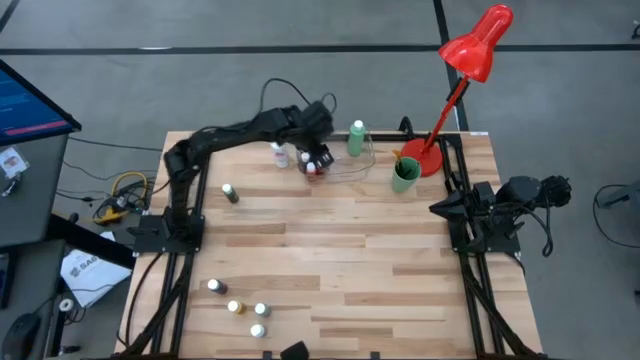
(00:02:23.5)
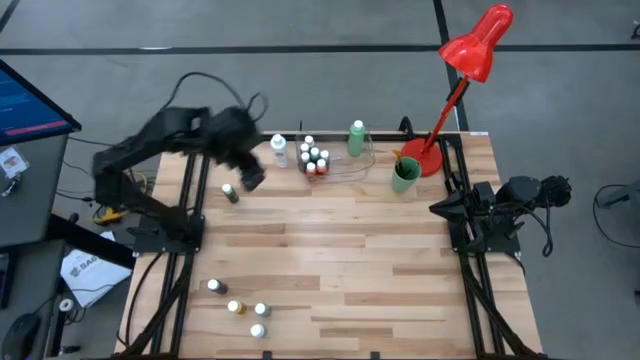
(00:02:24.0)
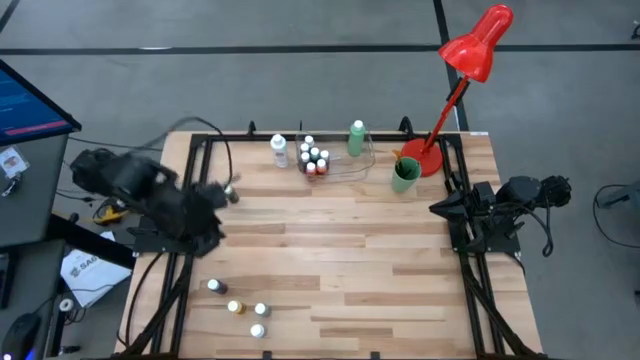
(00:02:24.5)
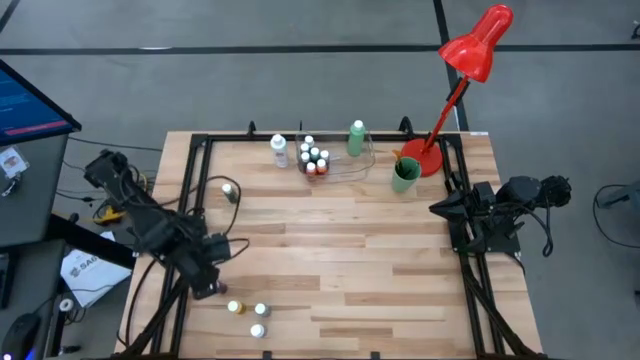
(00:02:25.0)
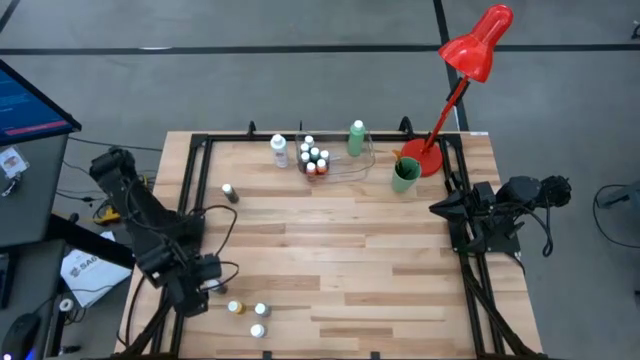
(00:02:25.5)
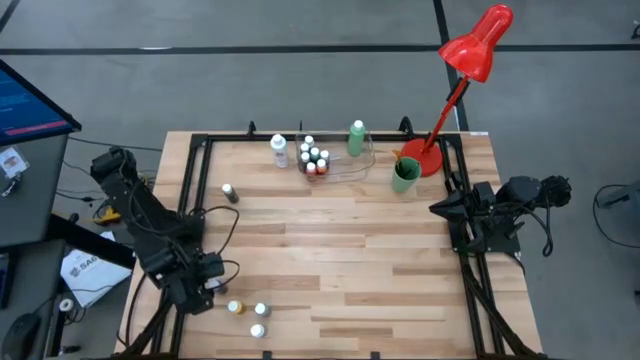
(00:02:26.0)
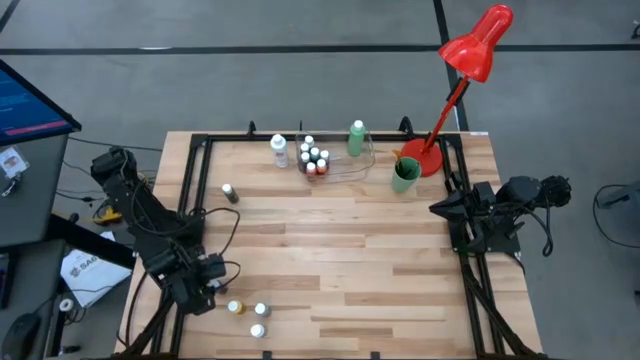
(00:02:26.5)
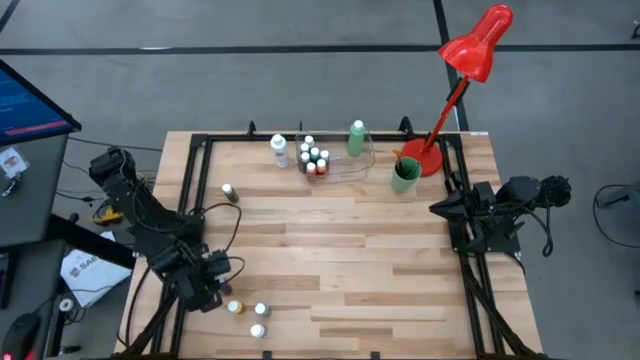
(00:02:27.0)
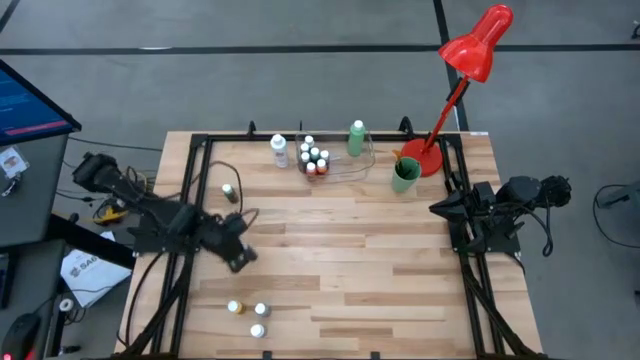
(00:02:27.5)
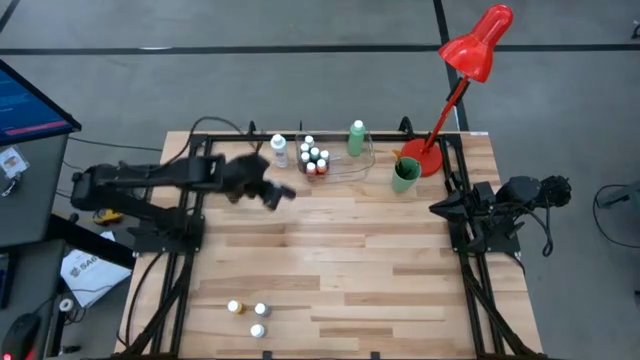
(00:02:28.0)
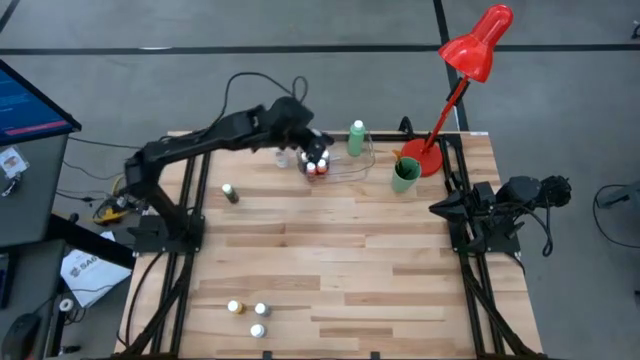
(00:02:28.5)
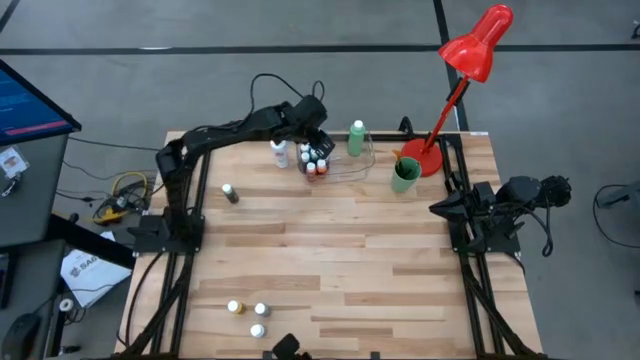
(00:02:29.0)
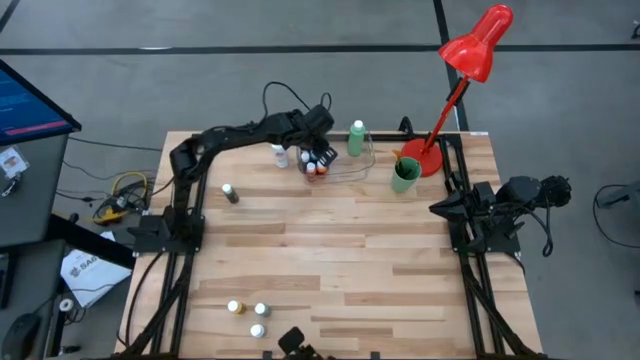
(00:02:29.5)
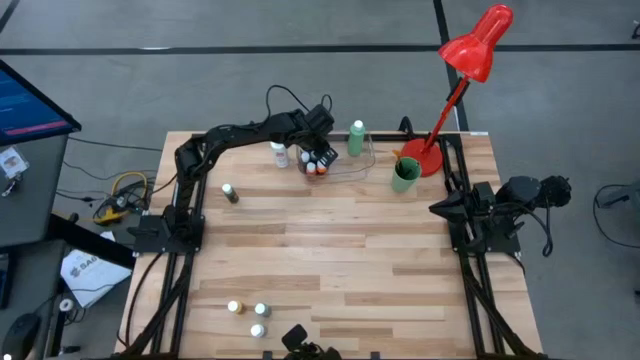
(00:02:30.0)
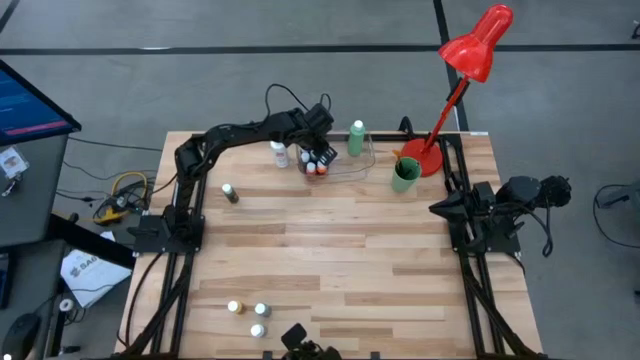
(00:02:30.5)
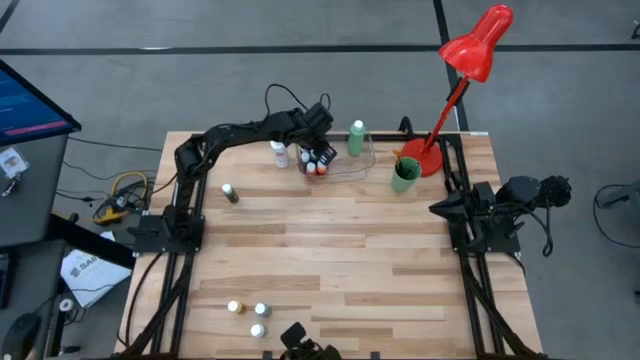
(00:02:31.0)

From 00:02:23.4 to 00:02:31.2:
Task: Pick & Place Paint Supplies
Put the small blue paint bottle into the transparent bin

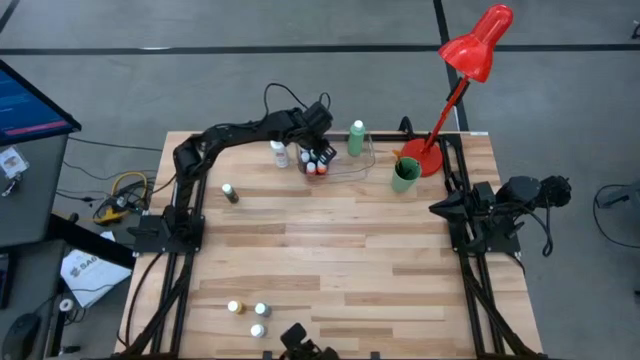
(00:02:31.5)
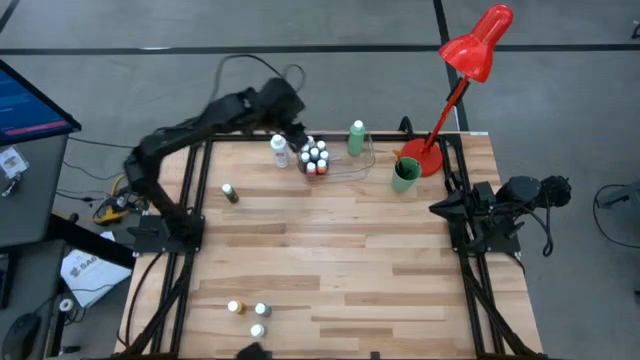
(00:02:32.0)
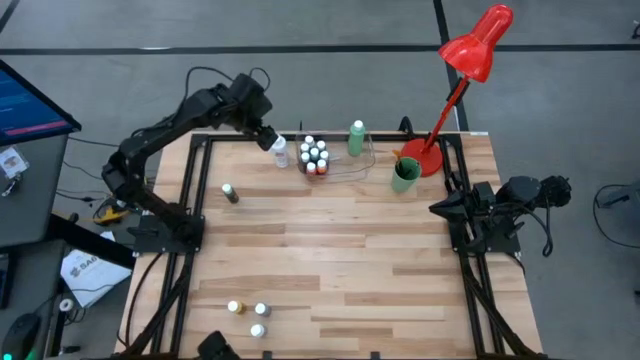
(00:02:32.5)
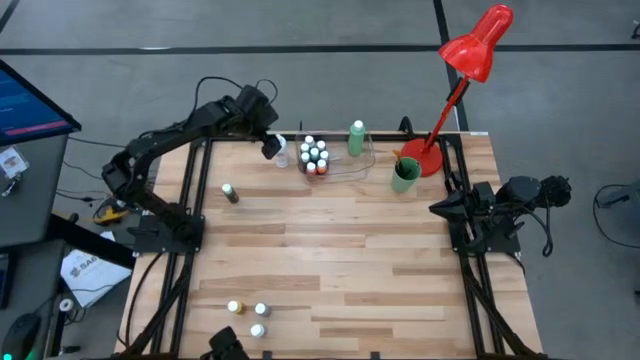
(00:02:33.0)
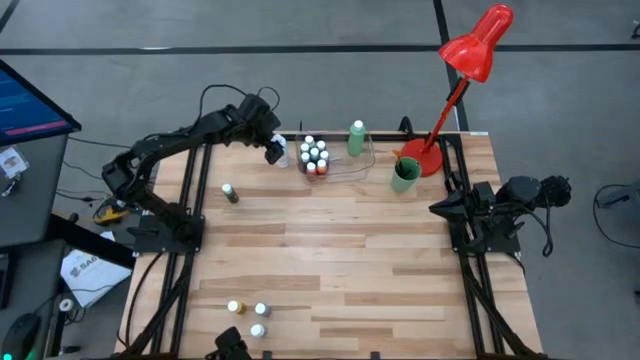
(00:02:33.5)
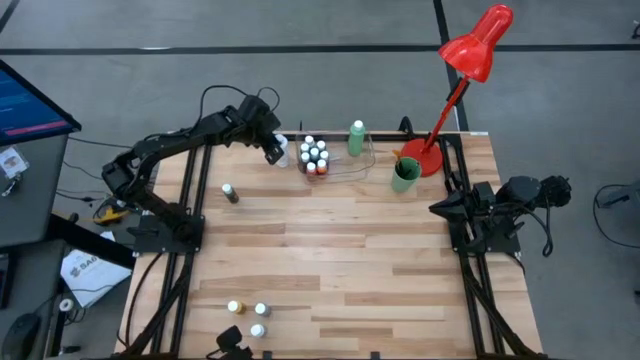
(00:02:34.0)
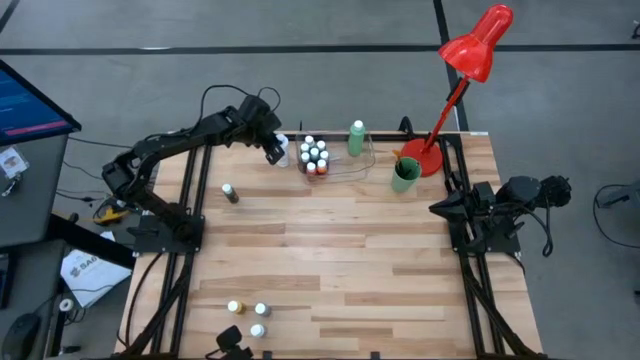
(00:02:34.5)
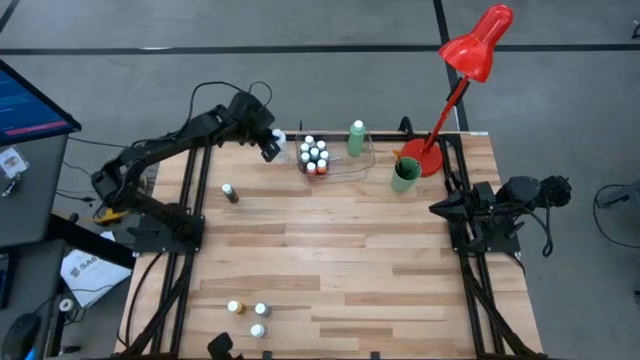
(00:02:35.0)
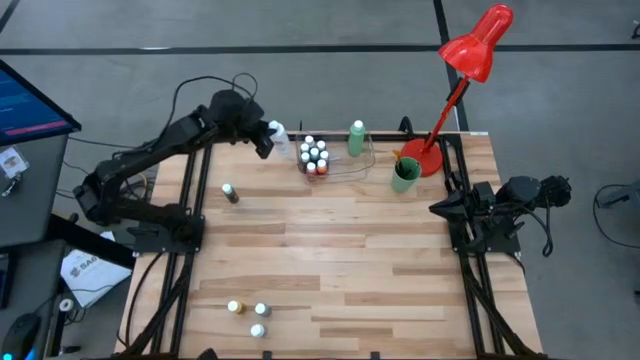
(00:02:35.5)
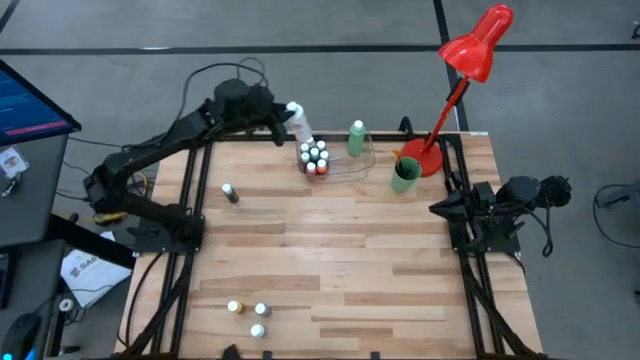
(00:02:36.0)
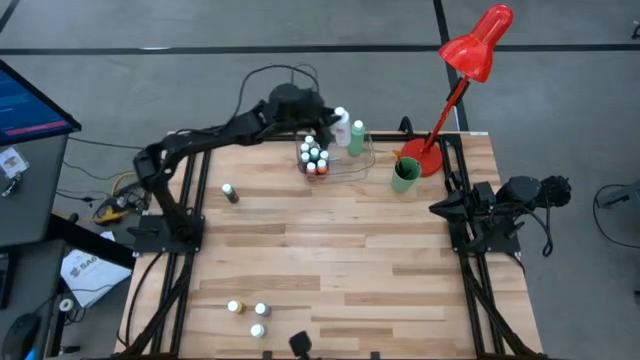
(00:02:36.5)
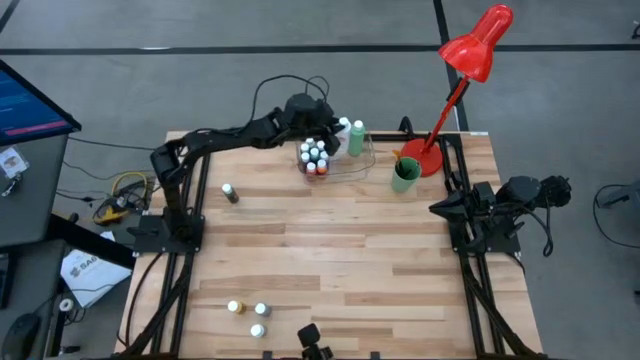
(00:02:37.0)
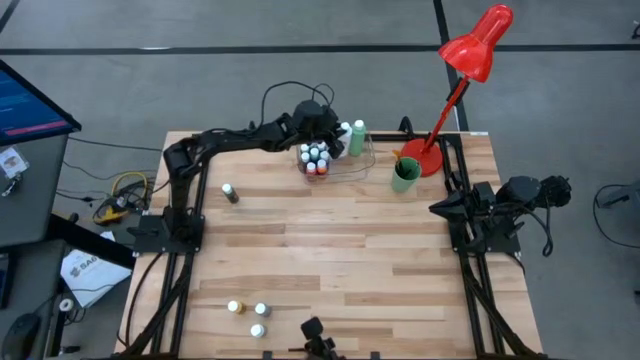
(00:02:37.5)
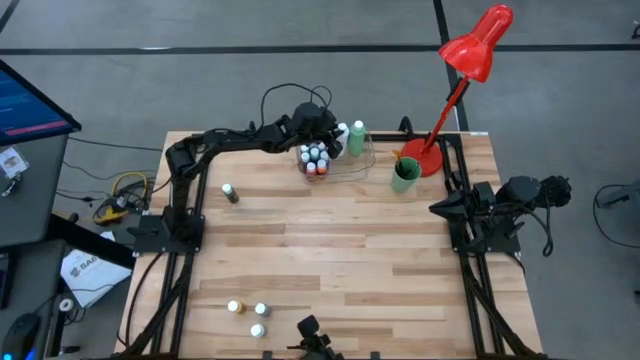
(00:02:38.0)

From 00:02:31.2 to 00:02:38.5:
Put the large white paint bottle into the transparent bin

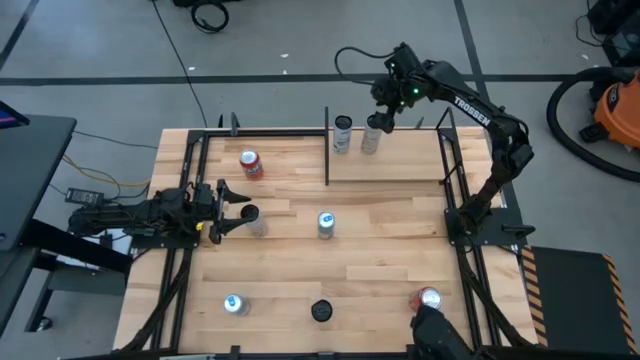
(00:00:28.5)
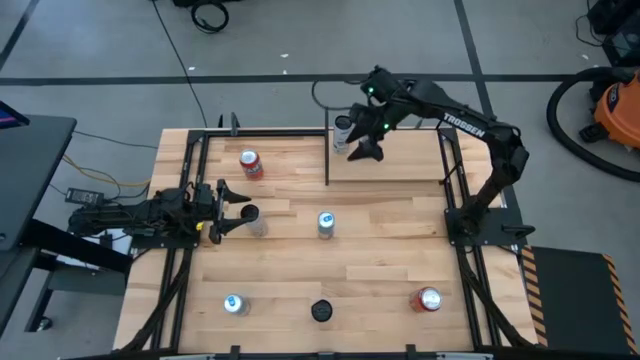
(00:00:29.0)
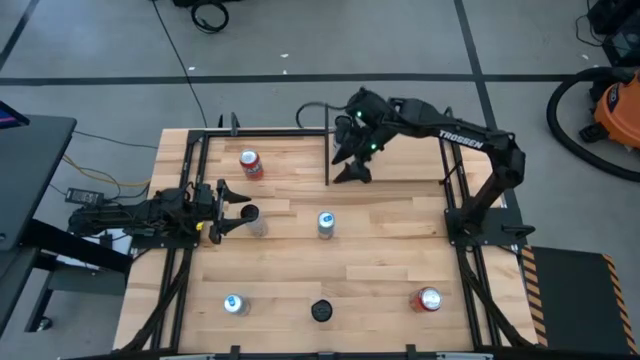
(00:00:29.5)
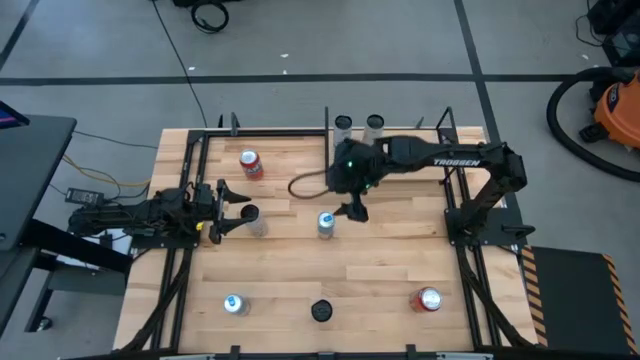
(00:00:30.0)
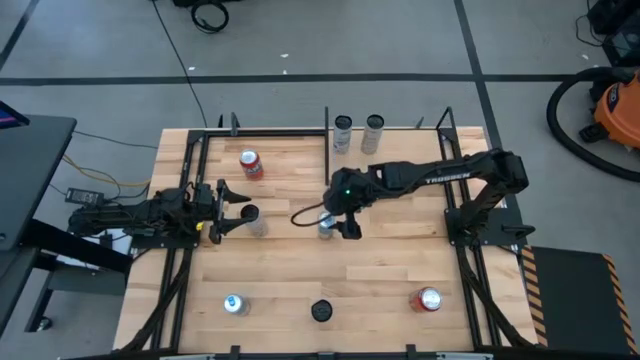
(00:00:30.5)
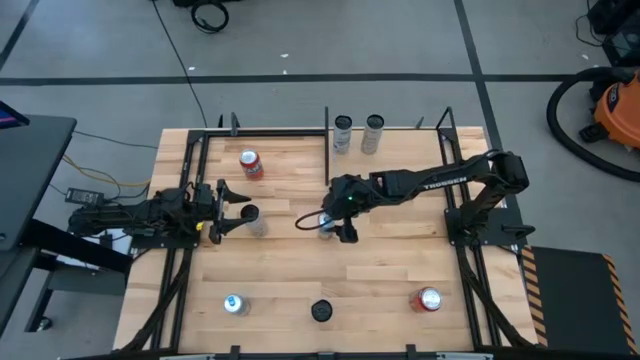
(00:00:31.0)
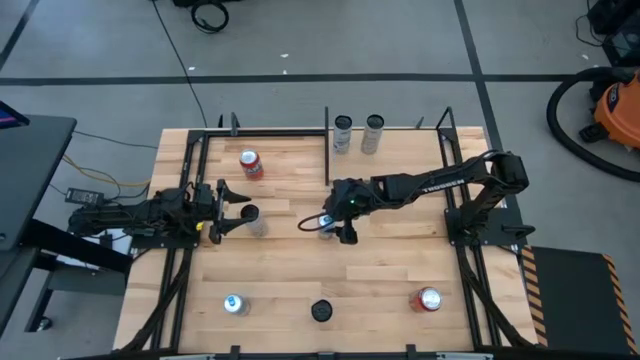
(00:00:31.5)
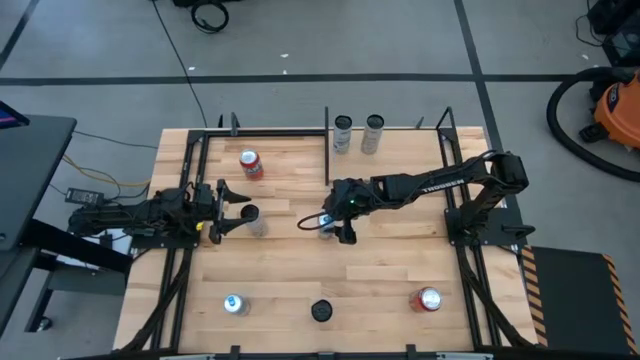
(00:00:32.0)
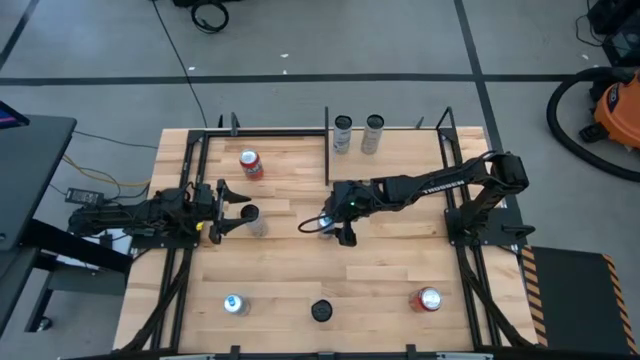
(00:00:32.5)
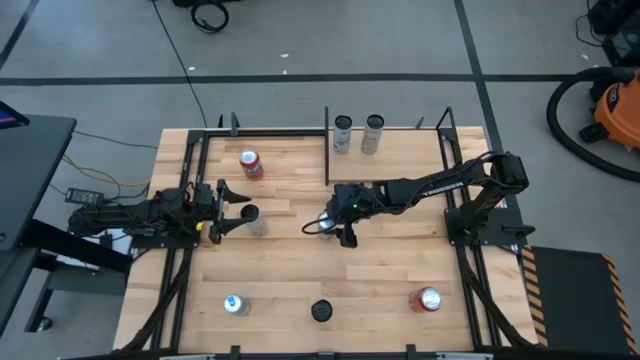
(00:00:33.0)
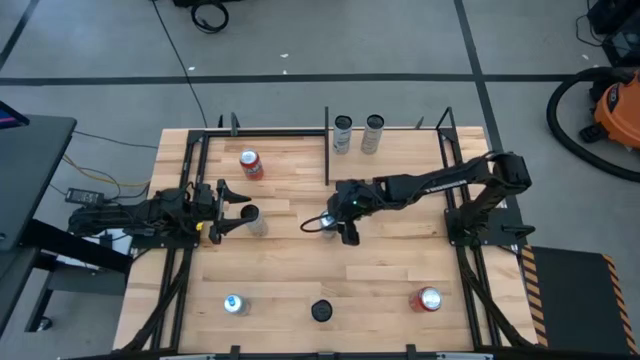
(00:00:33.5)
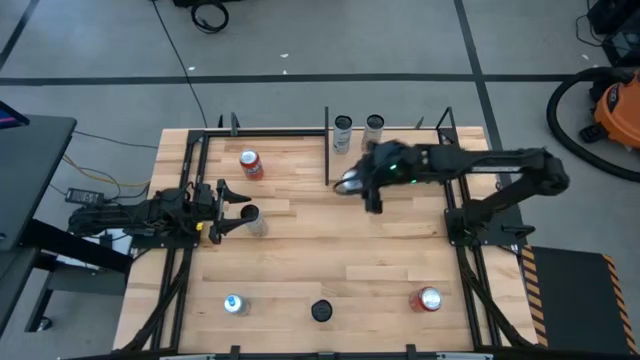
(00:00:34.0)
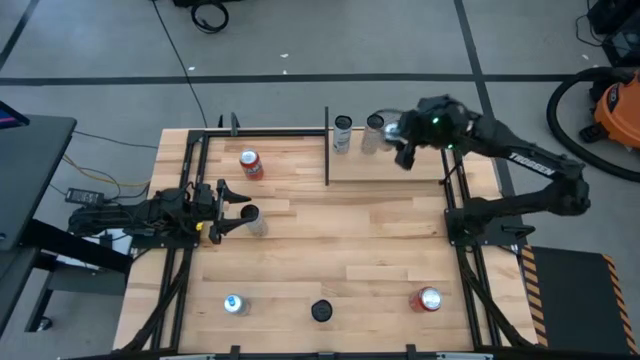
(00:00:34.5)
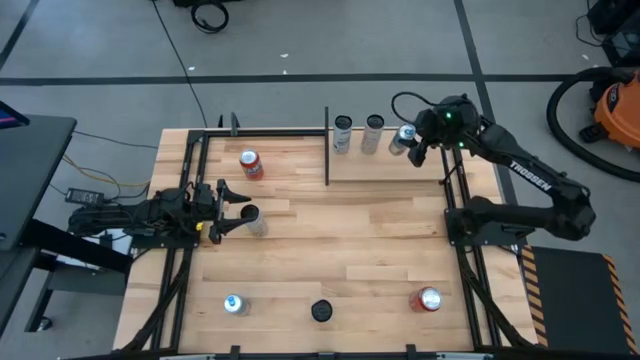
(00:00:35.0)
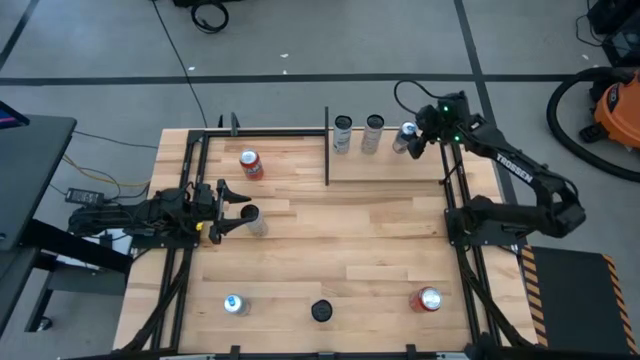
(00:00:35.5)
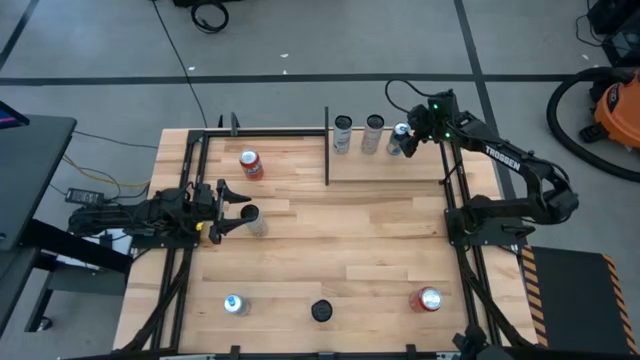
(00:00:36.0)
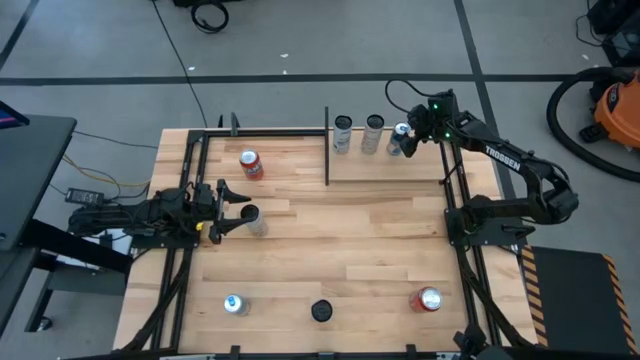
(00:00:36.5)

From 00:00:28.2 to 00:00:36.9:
Task: Place canned beverage on shelf
Put the right blue soda can on the shelf
